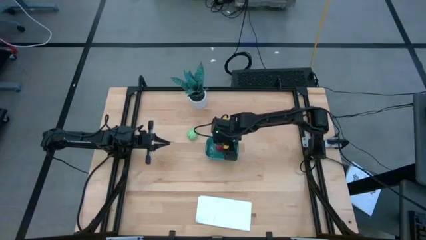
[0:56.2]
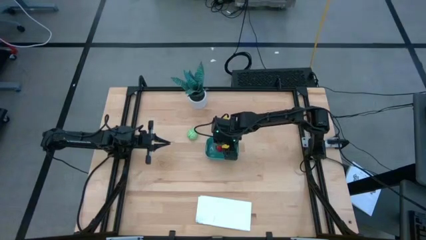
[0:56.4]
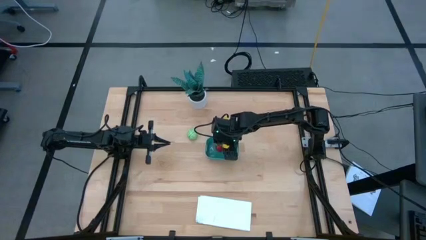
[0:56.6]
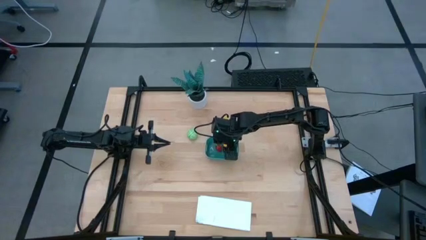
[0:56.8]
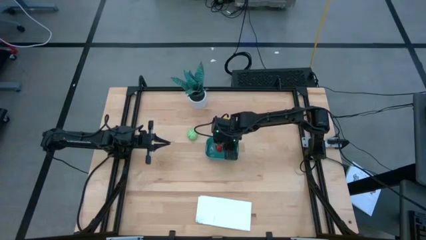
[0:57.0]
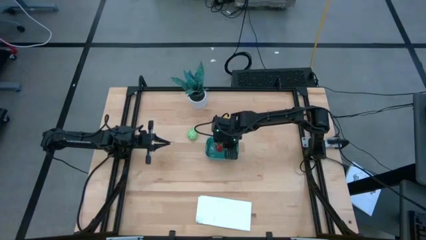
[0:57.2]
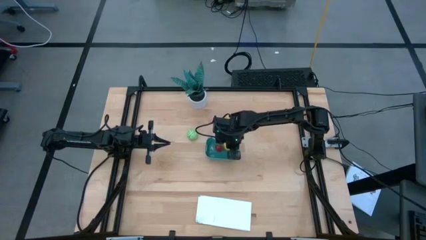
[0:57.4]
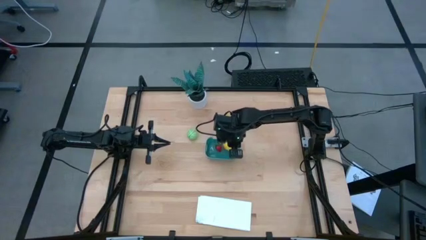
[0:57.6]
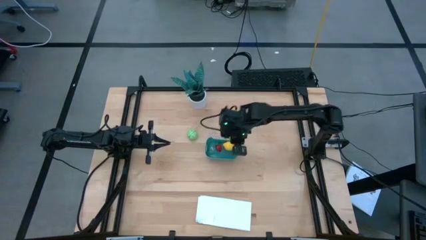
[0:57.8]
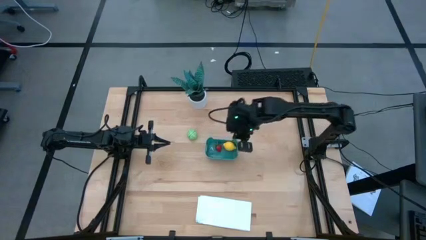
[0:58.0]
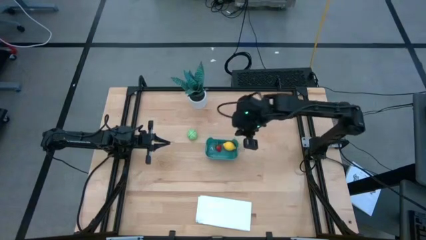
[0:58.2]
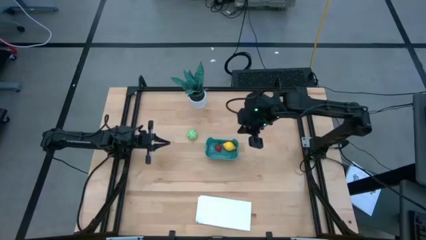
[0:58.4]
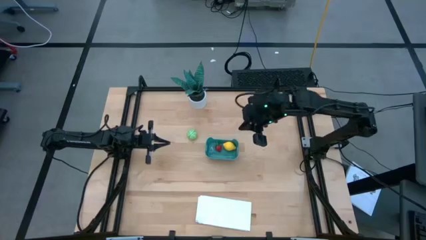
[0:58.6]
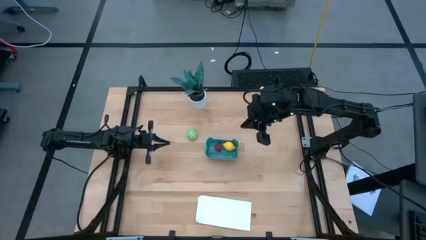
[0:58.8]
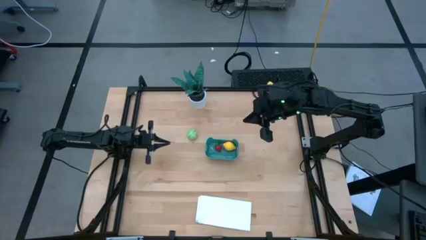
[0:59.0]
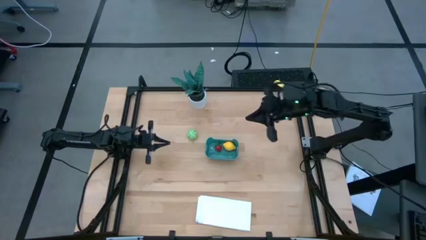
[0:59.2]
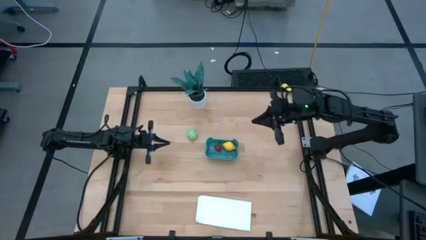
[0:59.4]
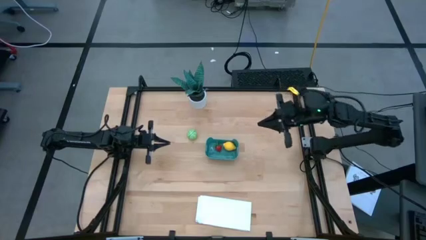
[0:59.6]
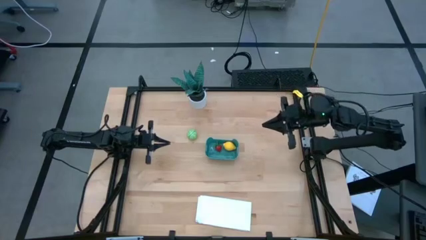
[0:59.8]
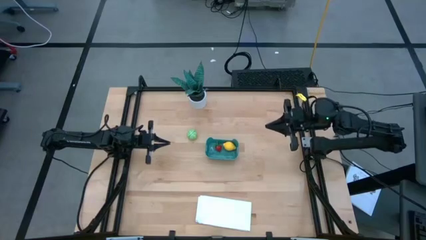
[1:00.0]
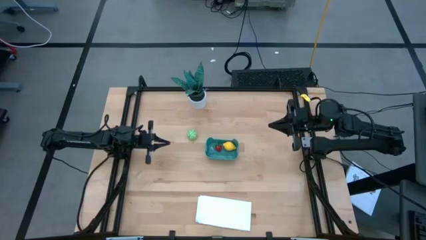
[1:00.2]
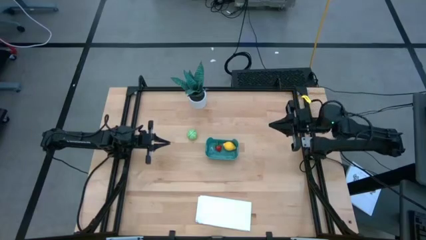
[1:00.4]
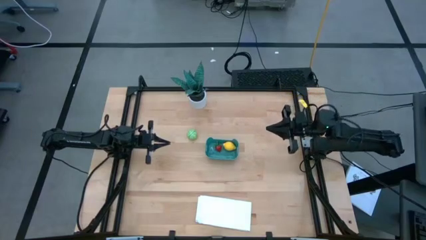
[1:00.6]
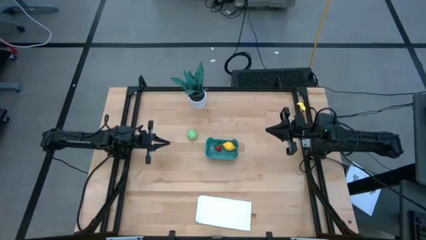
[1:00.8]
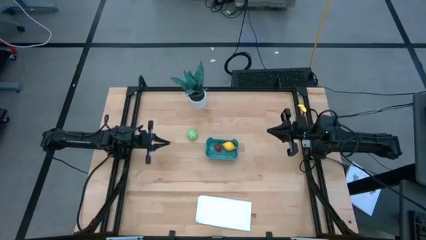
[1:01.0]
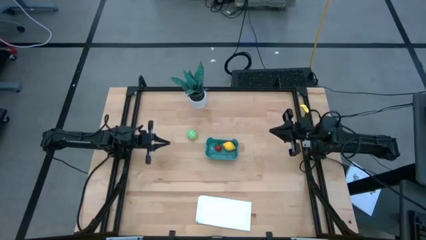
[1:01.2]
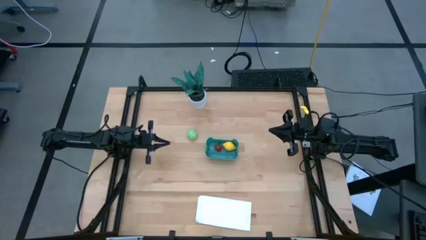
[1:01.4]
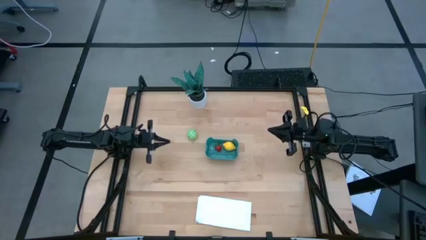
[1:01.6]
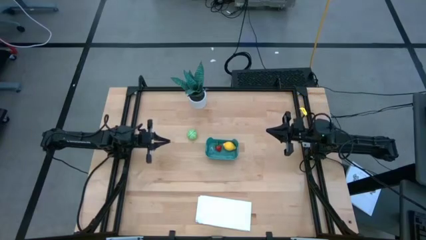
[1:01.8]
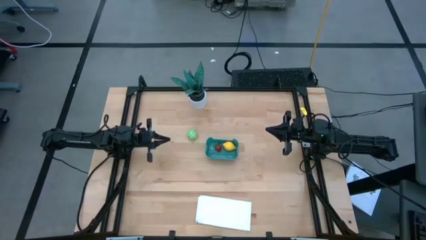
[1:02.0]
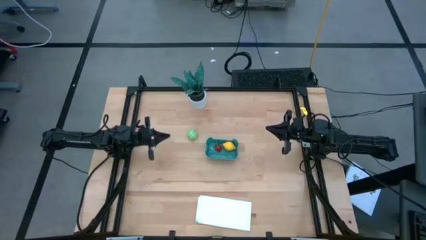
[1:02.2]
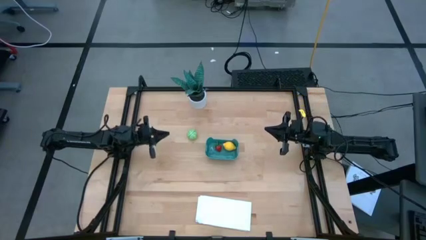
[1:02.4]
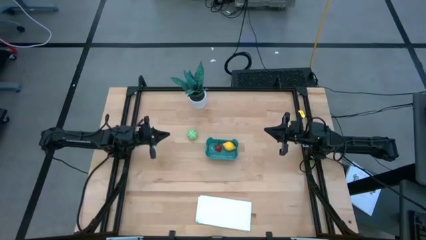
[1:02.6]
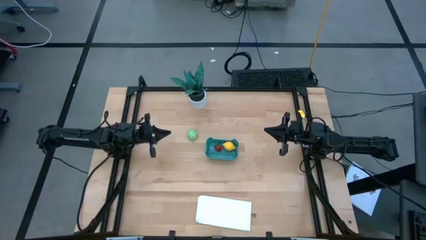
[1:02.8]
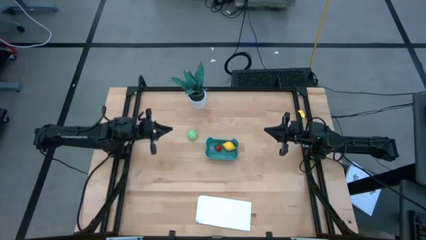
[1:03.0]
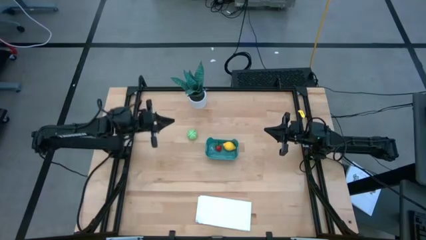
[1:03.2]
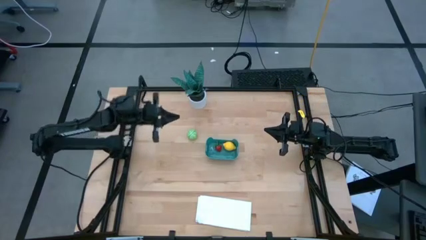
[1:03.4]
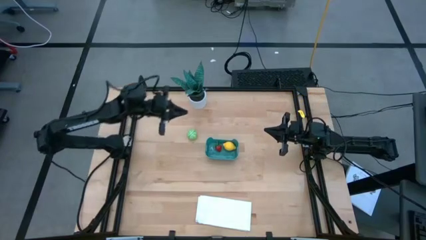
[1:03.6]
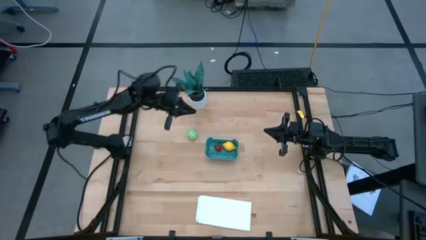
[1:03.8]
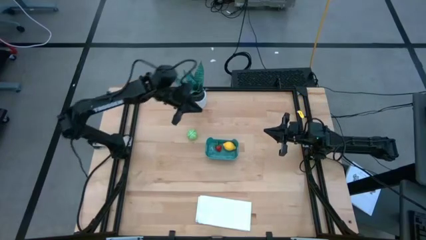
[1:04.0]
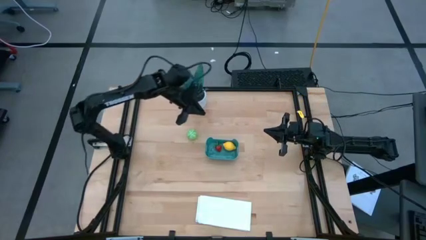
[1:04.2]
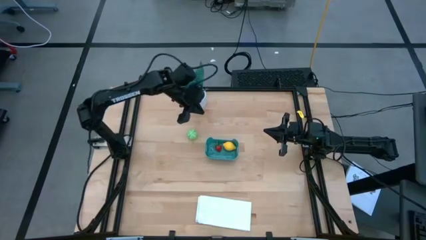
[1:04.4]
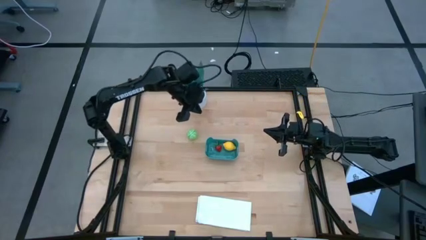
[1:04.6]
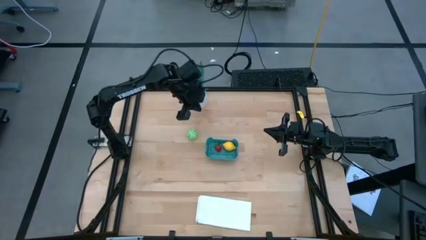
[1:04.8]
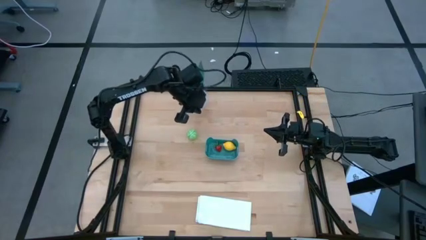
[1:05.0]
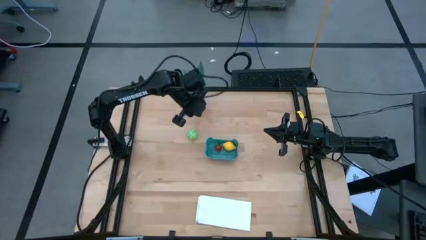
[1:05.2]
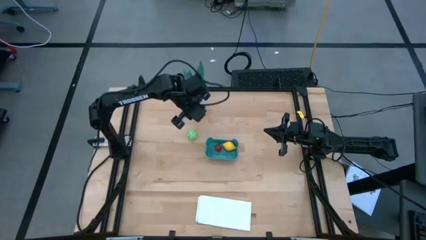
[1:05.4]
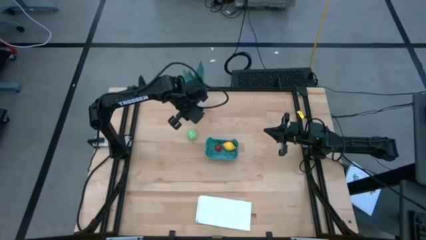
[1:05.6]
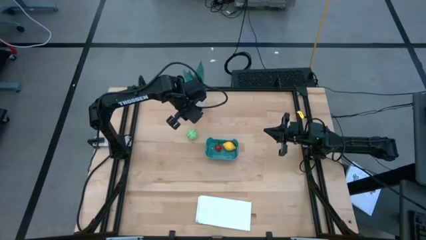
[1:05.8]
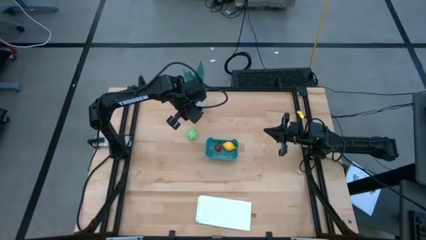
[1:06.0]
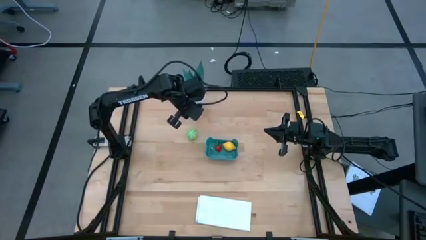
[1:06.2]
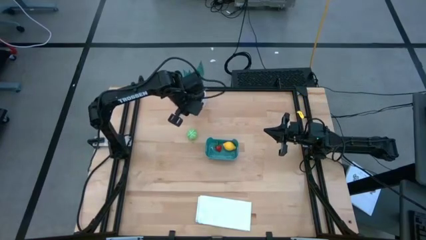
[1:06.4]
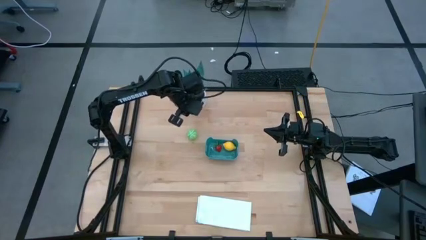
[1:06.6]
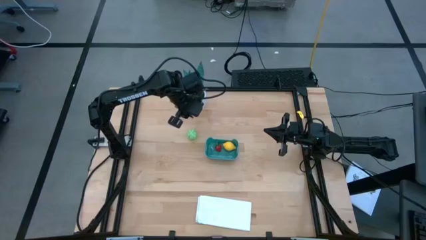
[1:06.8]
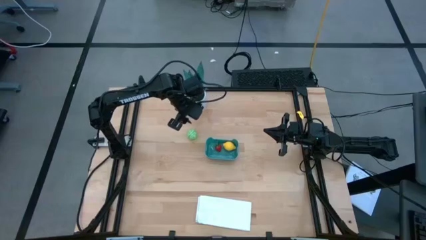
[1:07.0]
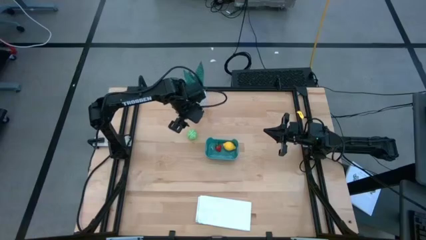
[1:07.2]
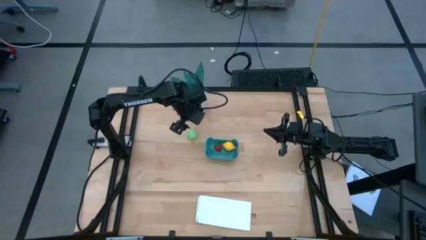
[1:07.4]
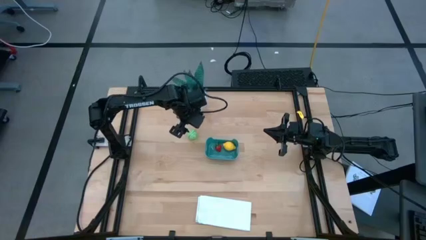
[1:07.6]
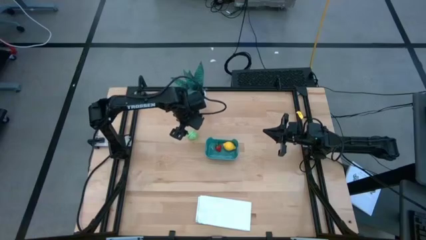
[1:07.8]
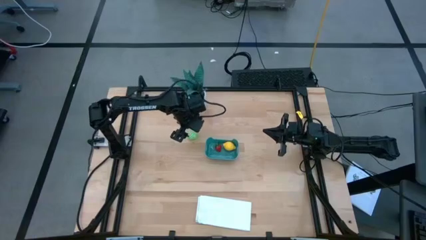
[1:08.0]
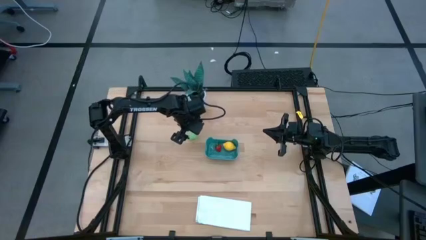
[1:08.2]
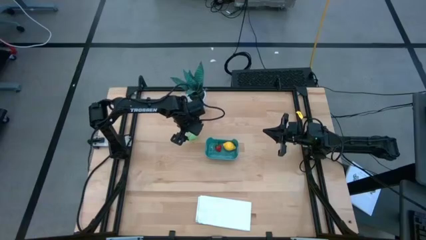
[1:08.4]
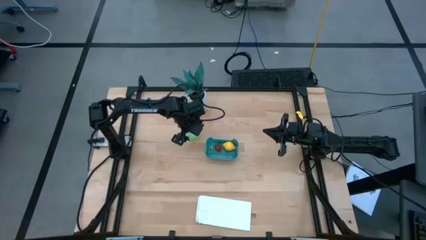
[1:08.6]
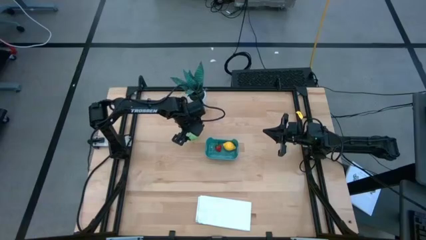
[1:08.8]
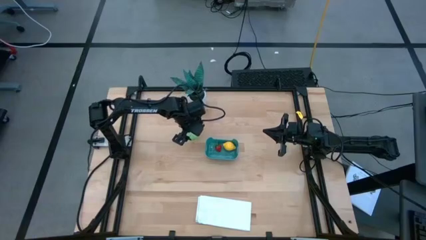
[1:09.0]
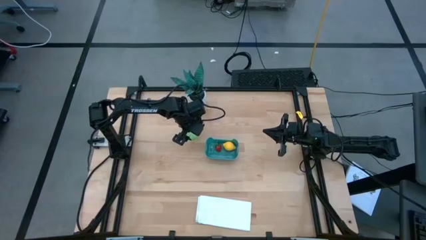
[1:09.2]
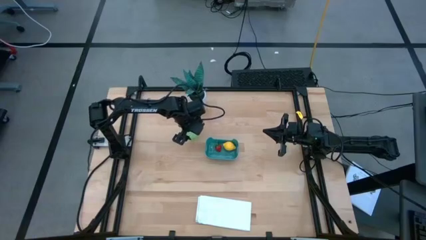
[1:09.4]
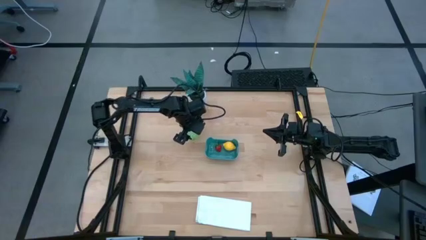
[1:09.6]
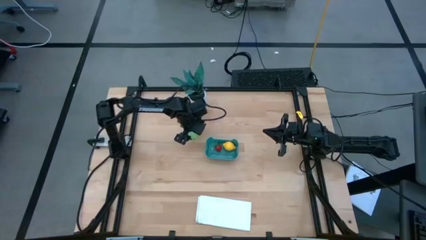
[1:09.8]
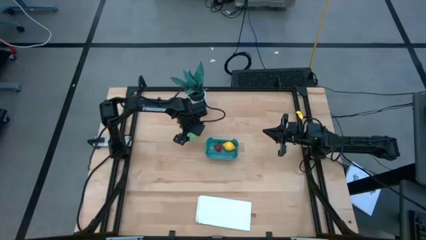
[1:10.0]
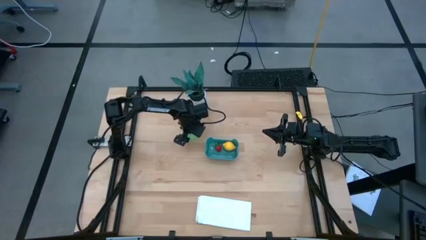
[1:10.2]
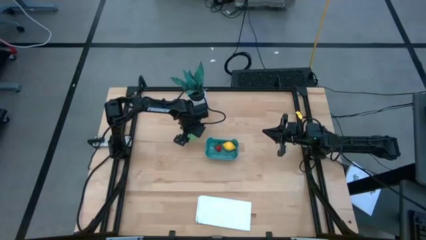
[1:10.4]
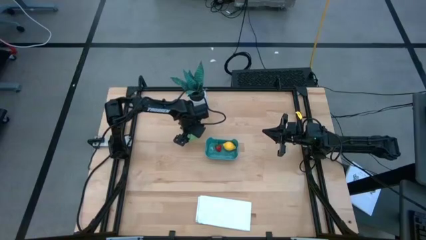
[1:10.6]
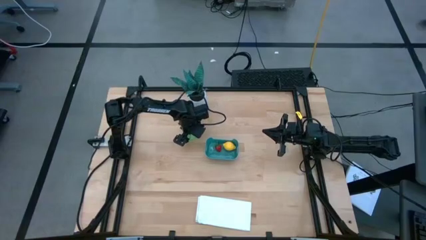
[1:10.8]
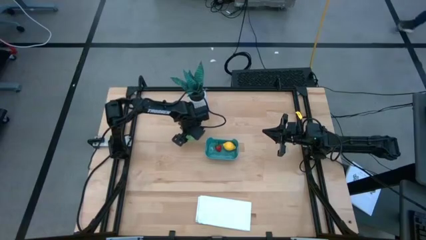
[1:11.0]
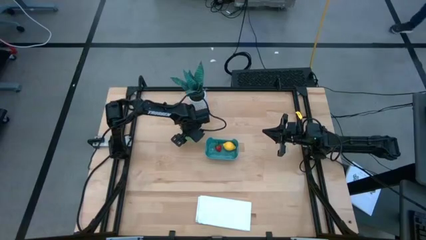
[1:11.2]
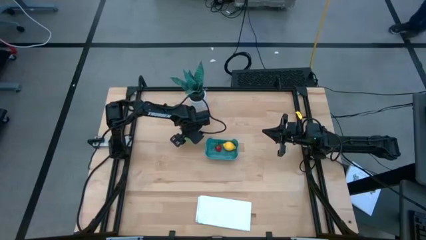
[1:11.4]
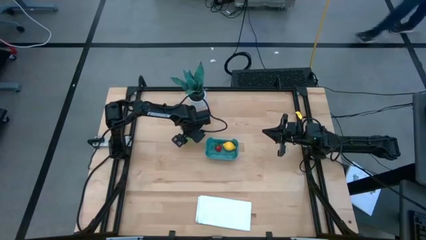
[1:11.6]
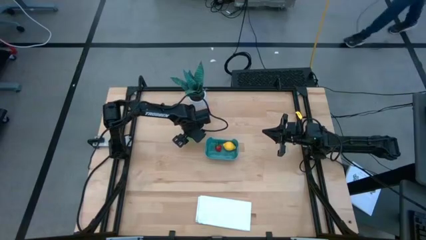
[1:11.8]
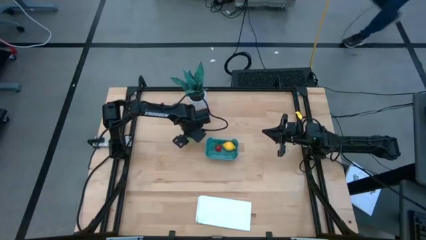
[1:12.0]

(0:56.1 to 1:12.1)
Task: Pick and placing Produce into tupperware
Put the green cabbage into the blue container
